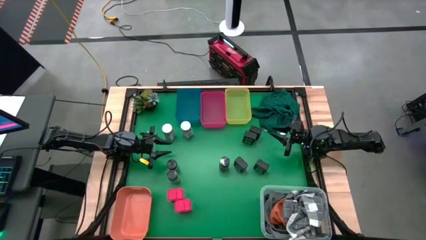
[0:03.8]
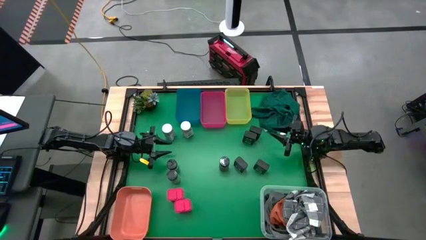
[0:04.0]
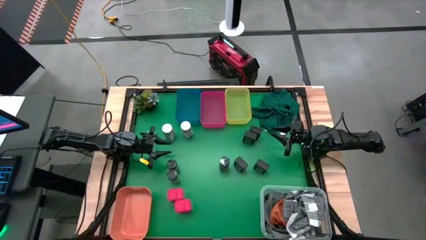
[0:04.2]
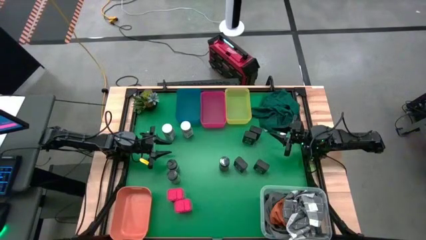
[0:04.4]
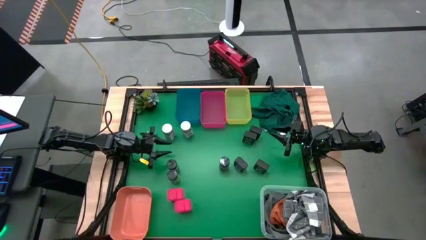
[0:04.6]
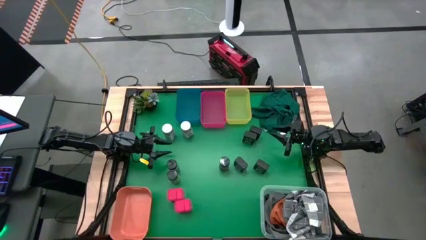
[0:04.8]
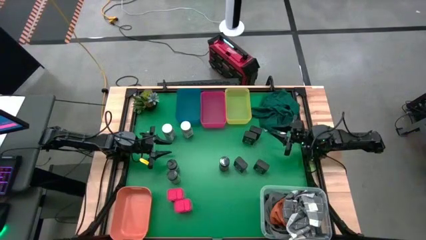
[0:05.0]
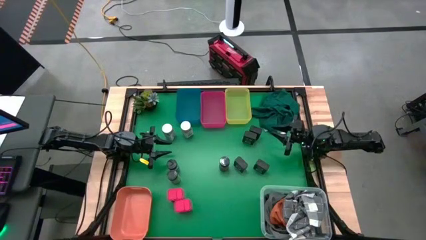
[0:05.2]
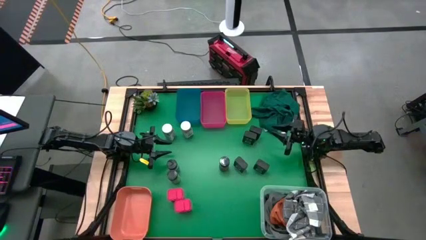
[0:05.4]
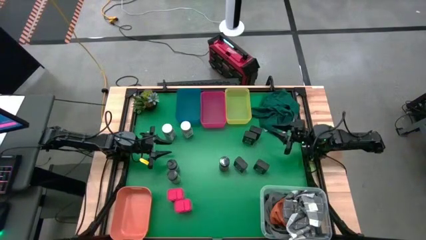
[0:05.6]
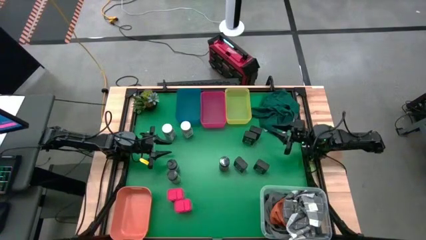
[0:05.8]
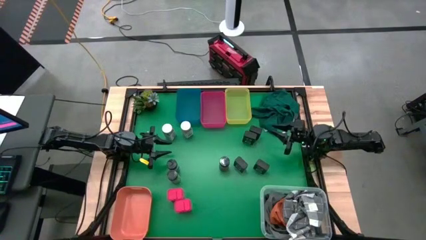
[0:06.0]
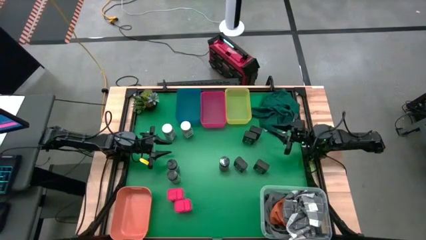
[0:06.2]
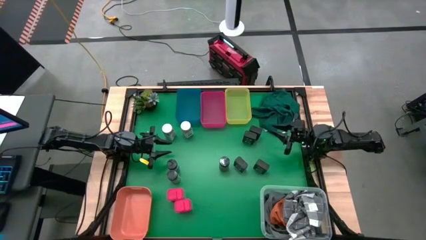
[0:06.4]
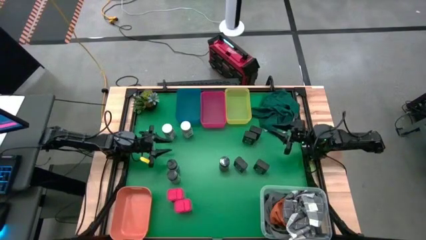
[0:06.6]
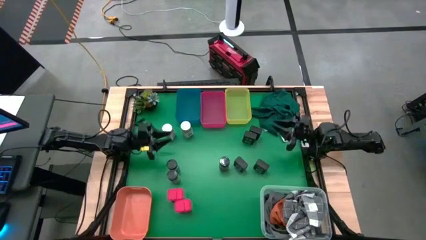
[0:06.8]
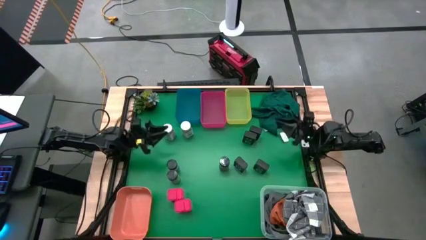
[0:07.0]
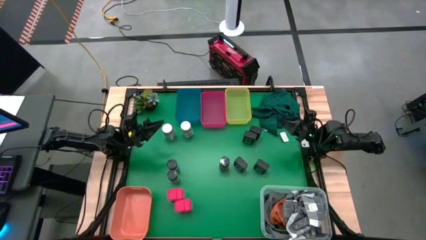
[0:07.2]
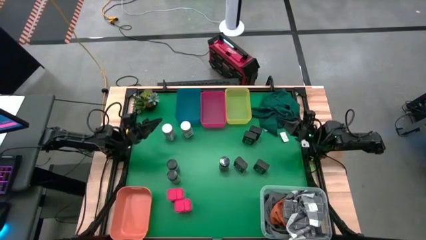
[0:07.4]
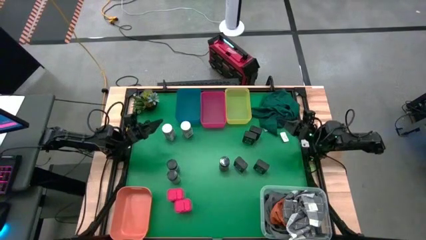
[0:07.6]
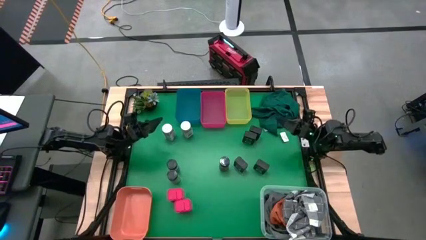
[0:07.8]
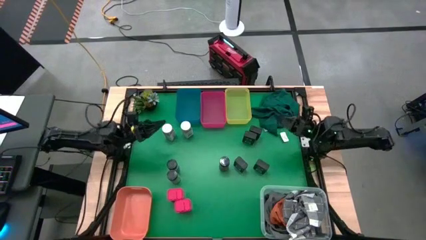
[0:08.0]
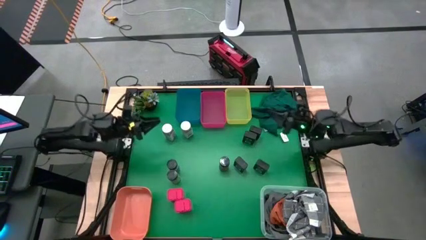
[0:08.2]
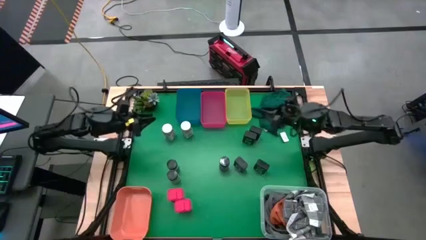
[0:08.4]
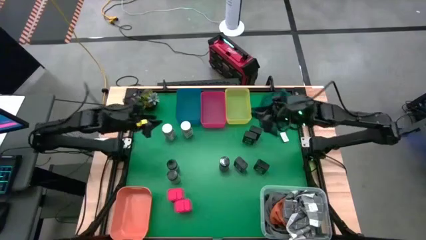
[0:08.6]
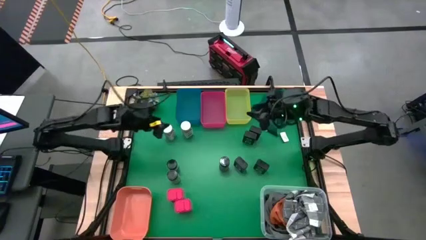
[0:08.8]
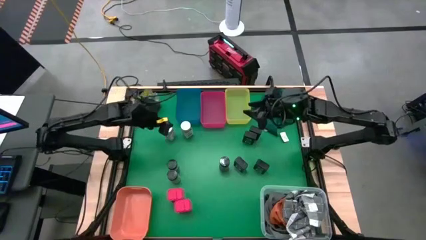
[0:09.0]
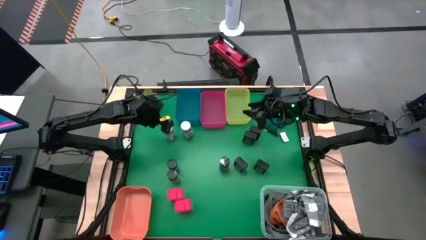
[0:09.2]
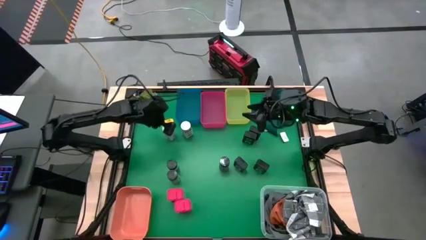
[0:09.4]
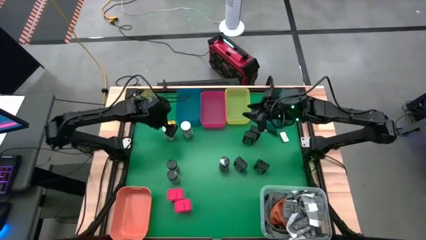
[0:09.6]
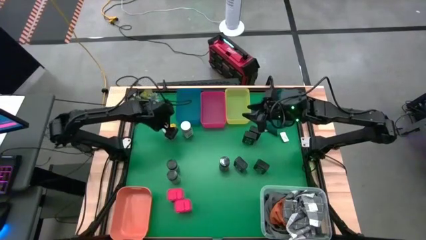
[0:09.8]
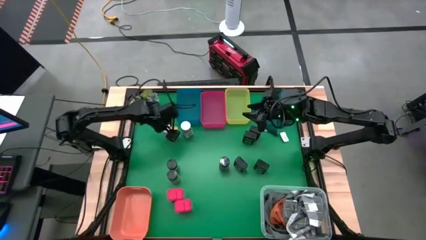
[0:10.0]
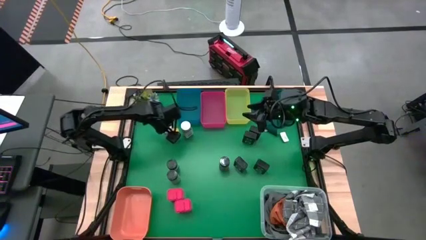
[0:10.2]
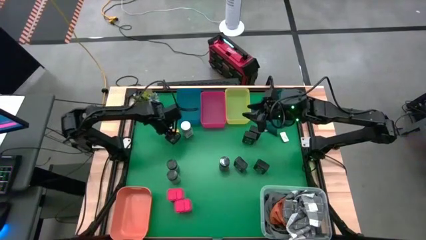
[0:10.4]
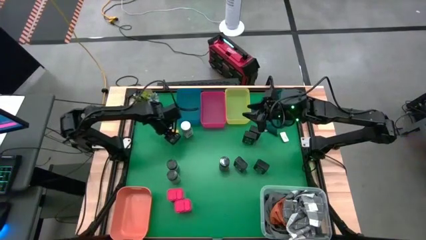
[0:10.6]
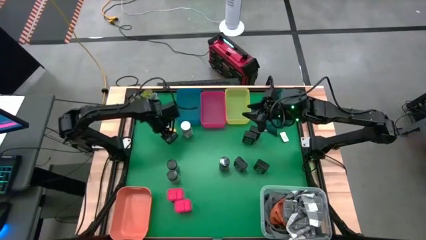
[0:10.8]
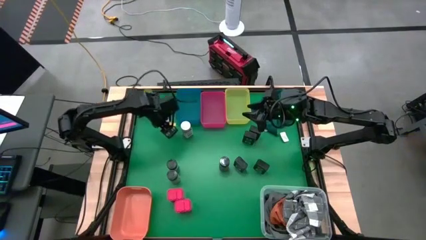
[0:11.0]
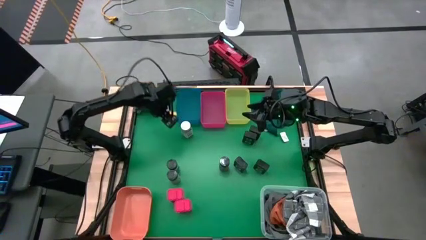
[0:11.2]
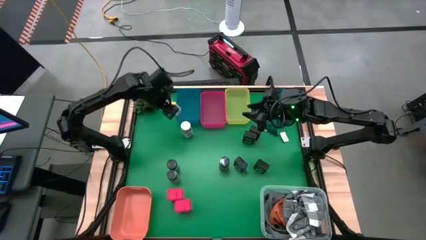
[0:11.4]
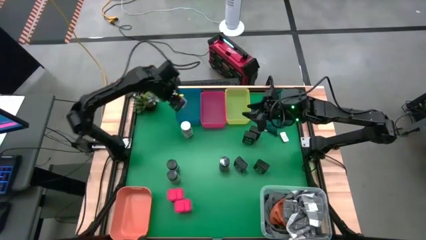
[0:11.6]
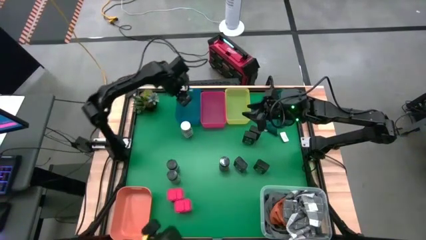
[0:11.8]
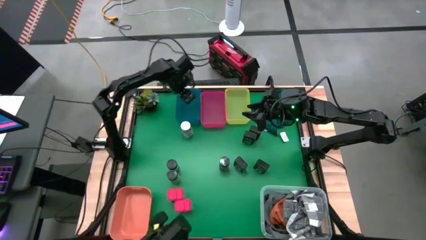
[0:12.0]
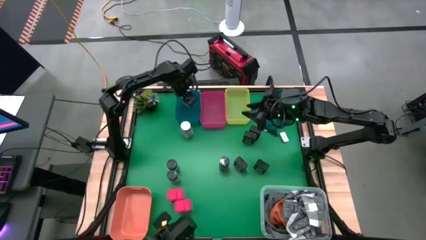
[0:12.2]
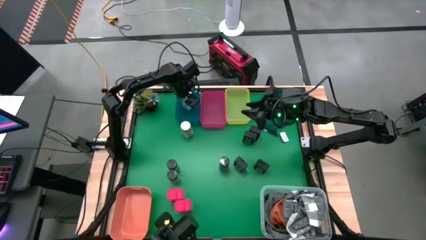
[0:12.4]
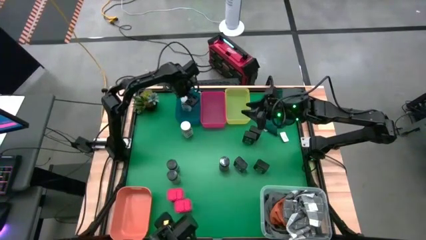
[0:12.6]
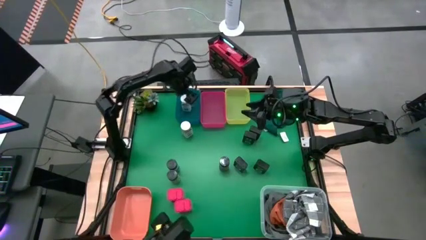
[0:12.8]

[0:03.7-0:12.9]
Task: Sort spices by type
Put the left white seasoning bottle into the blue bin

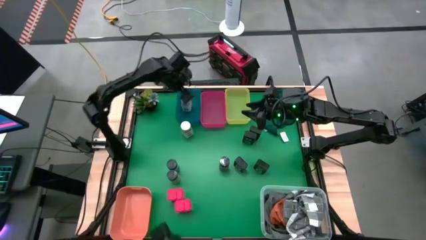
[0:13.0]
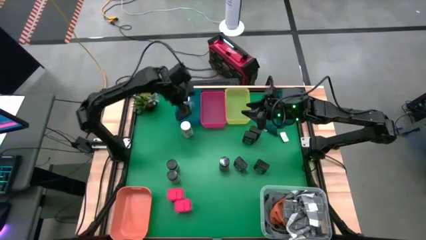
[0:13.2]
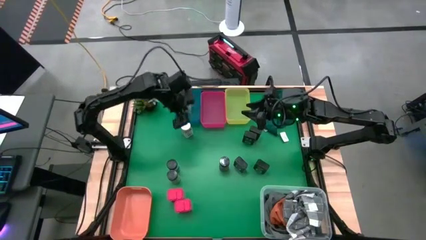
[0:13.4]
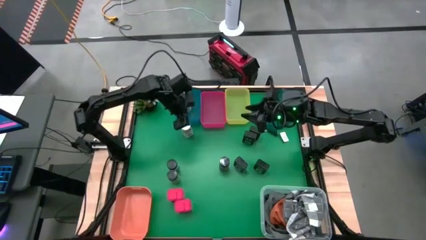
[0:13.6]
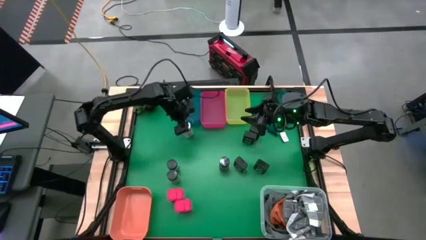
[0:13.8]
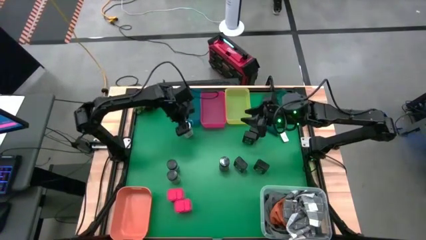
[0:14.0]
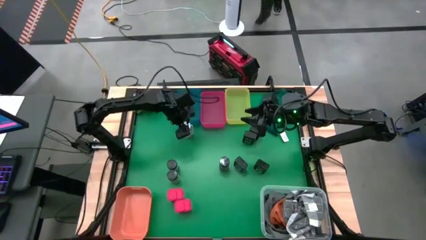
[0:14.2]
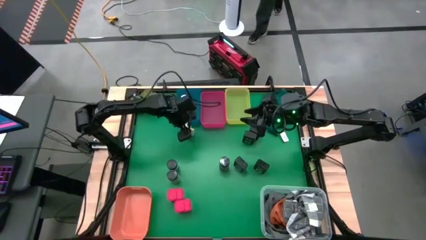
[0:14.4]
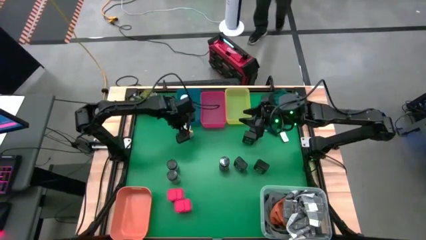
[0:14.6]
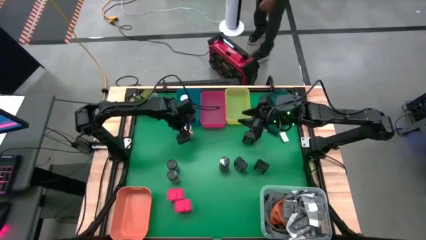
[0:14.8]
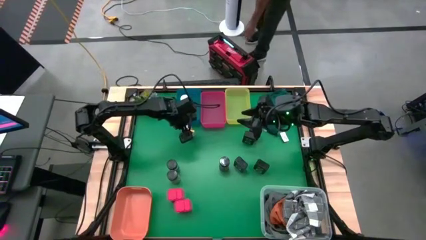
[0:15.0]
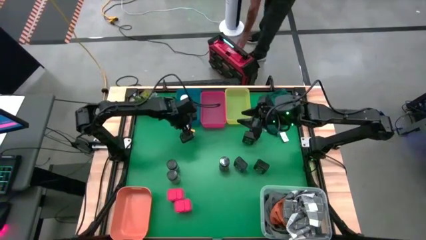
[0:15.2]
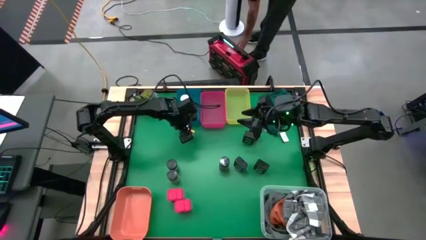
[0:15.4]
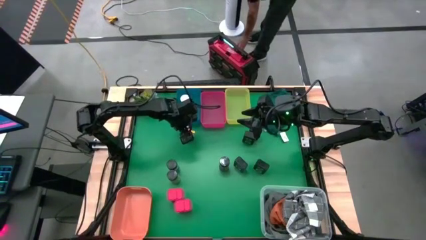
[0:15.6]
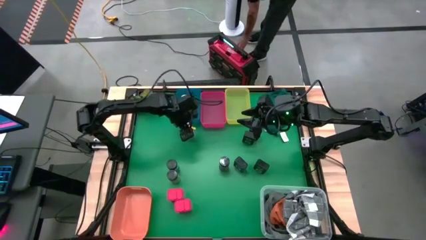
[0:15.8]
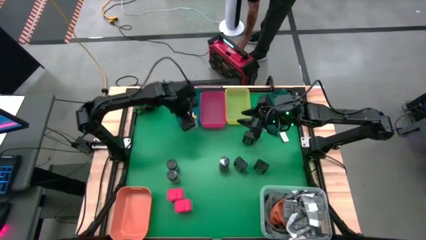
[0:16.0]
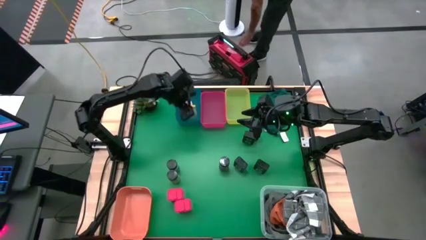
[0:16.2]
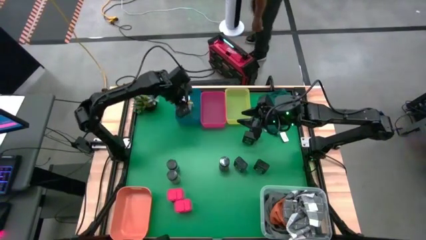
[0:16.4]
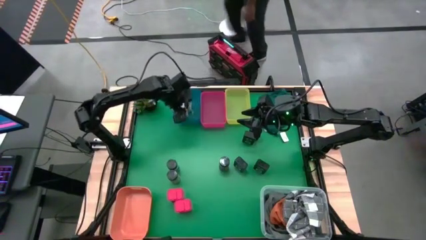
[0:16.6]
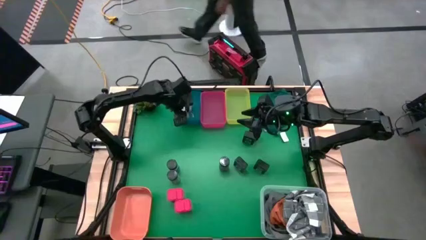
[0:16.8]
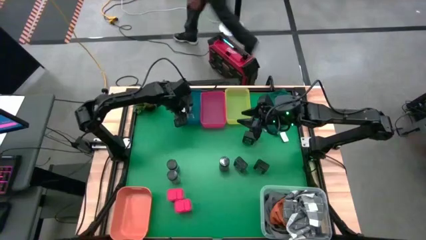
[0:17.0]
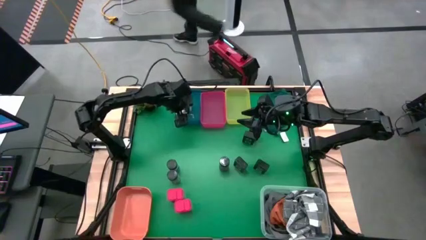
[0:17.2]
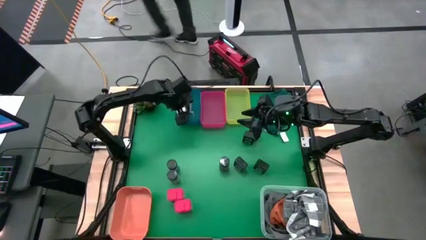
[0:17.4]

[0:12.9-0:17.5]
Put the white seasoning bottle into the blue bin

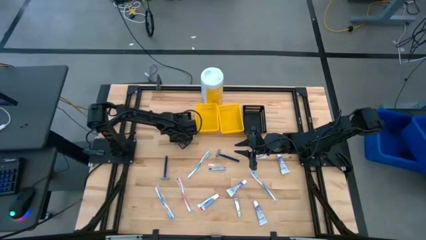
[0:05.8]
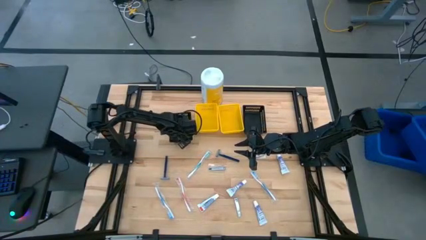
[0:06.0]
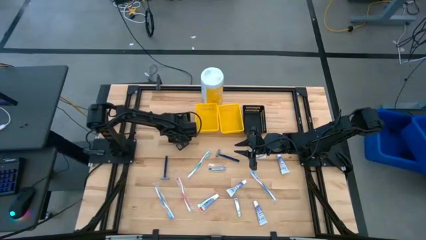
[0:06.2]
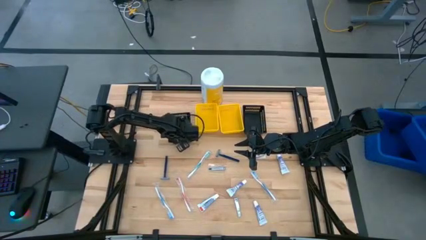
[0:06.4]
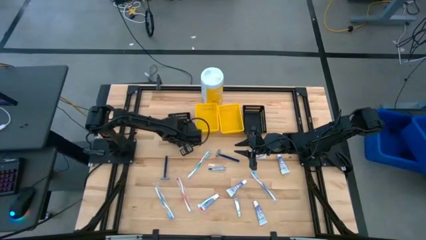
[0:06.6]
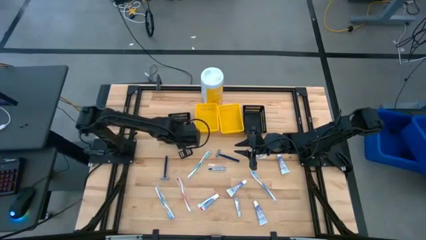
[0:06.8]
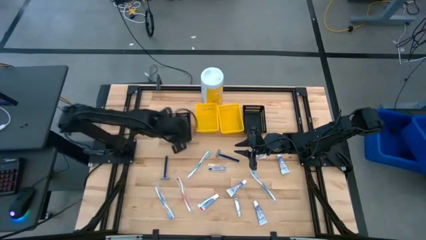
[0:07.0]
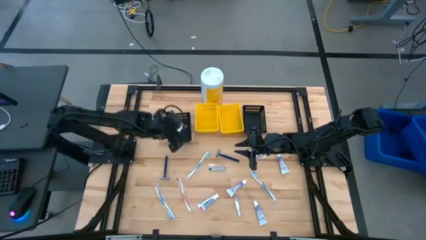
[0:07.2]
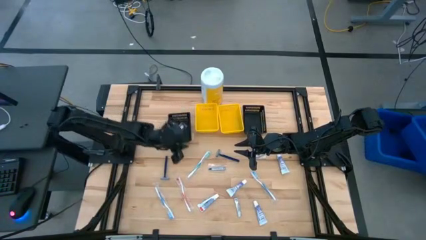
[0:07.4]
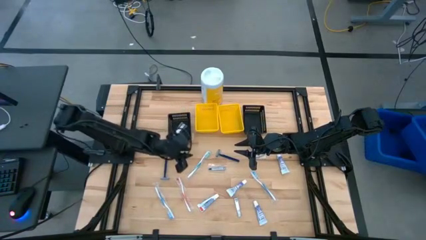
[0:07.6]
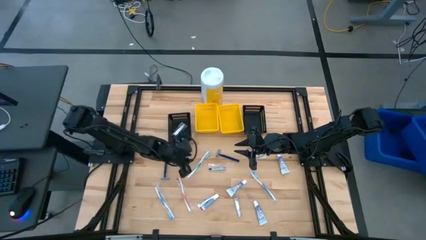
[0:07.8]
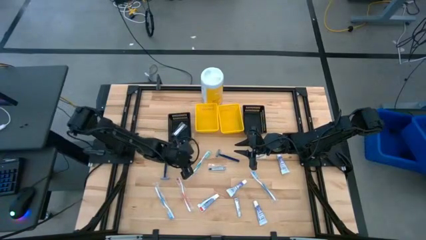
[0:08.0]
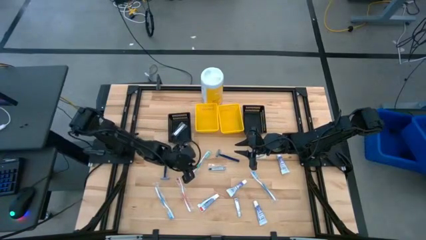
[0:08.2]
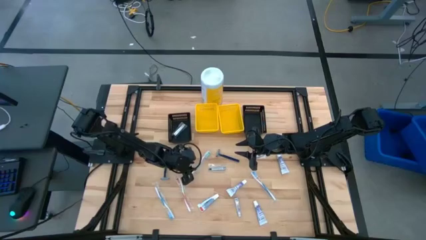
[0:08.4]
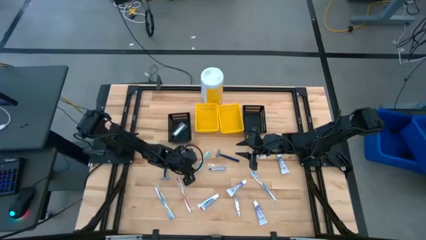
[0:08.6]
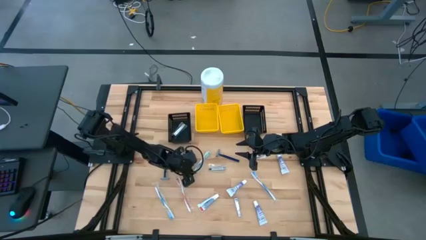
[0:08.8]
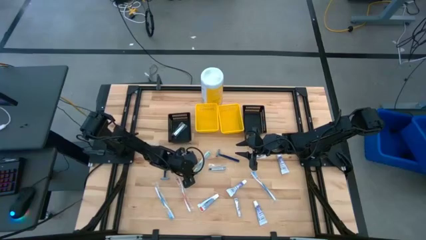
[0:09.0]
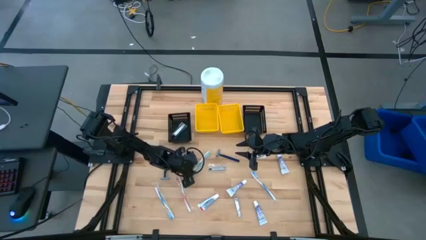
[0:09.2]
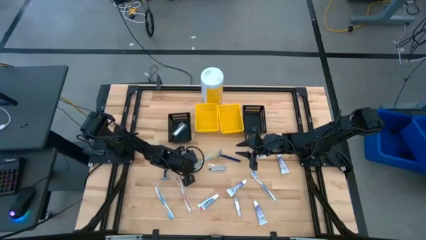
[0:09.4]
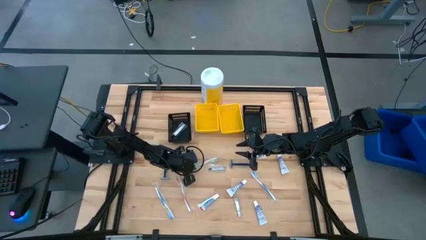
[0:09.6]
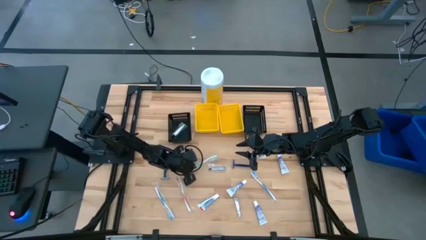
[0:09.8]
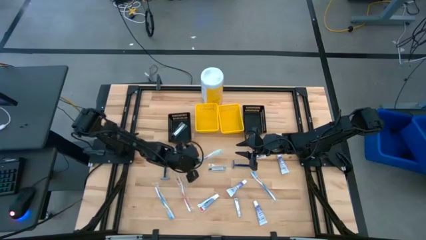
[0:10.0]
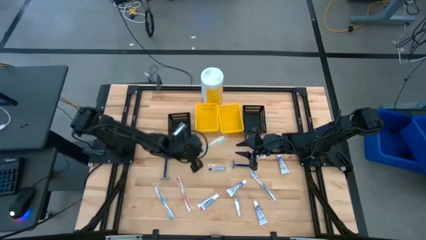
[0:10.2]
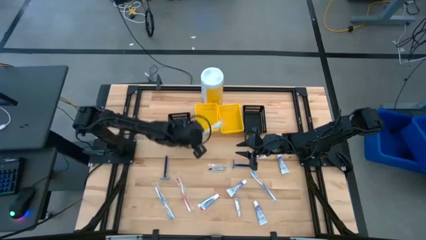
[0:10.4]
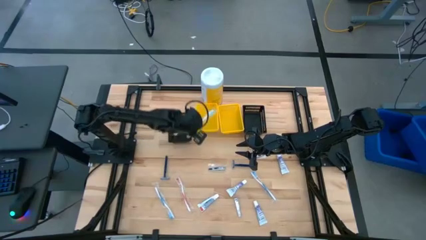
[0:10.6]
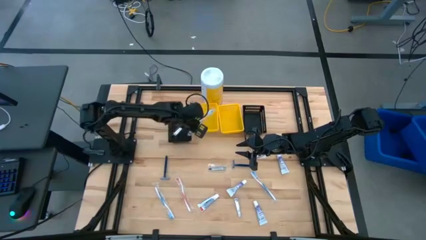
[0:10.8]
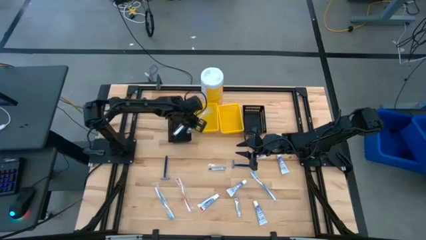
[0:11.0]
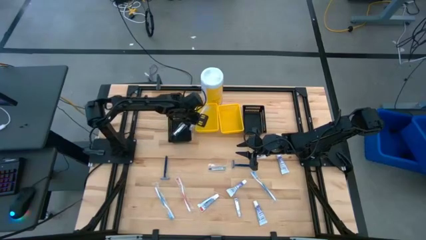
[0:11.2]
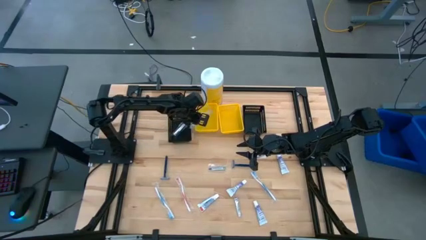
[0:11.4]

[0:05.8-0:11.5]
Task: Pick & Place Travel size toiletries
Put the light blue toothbrush into the left yellow bin
